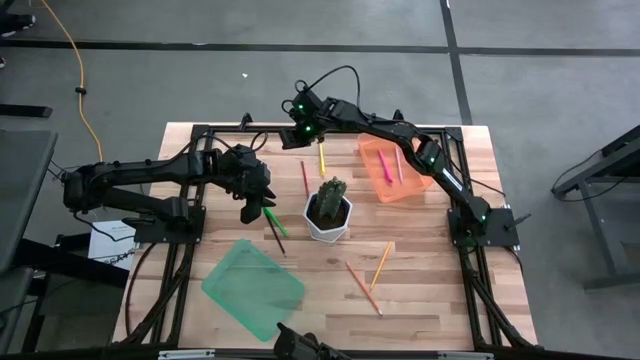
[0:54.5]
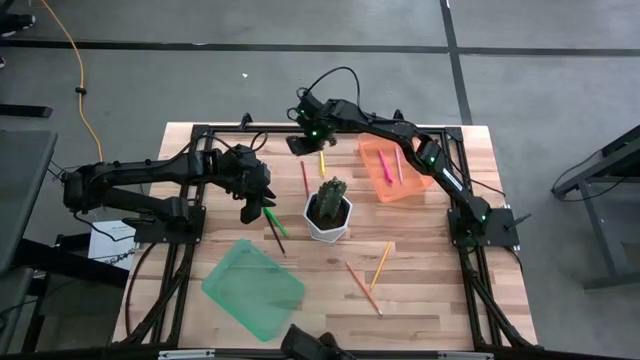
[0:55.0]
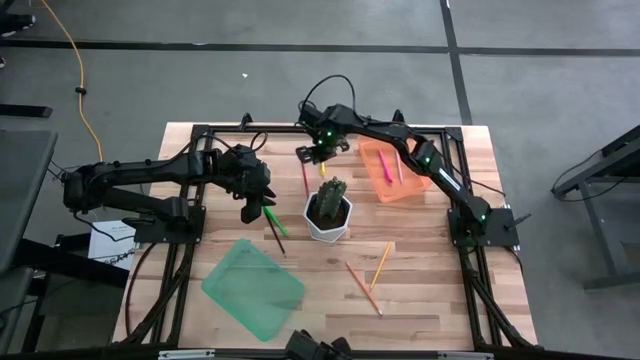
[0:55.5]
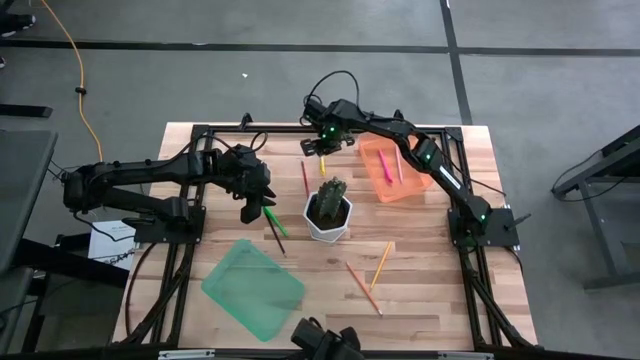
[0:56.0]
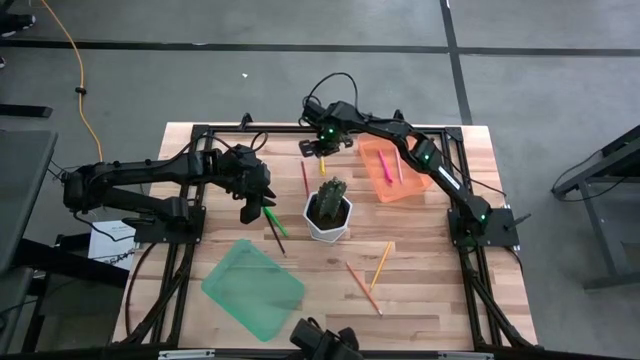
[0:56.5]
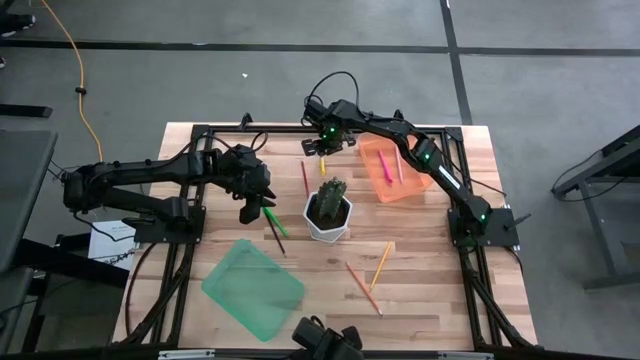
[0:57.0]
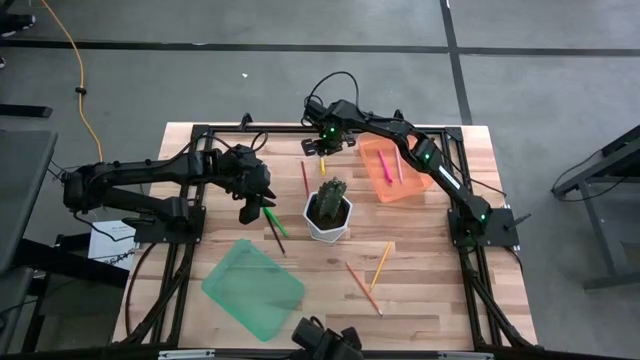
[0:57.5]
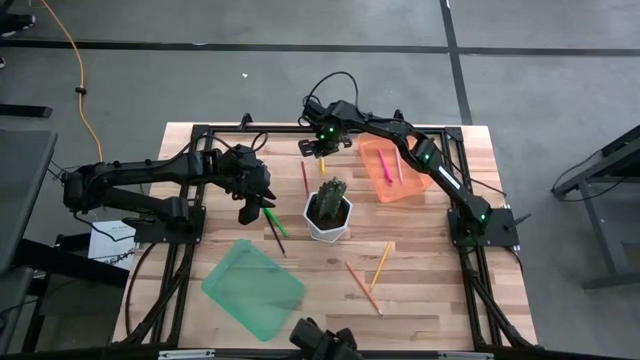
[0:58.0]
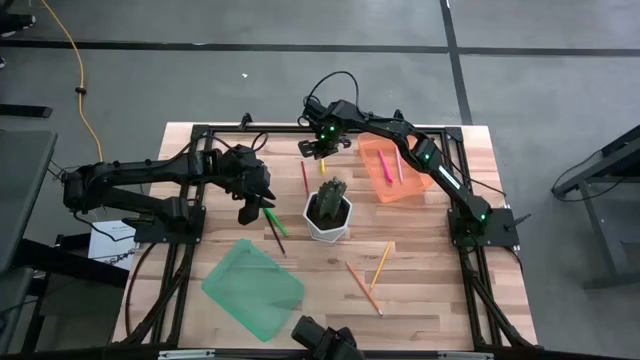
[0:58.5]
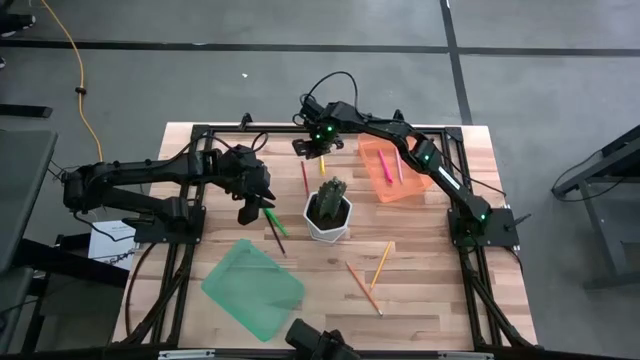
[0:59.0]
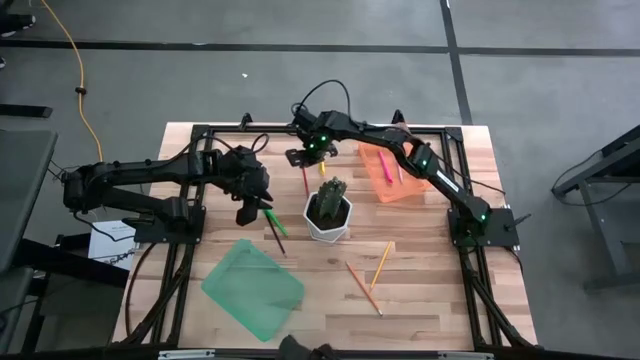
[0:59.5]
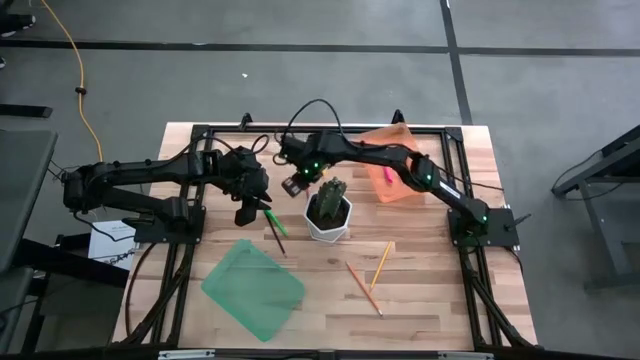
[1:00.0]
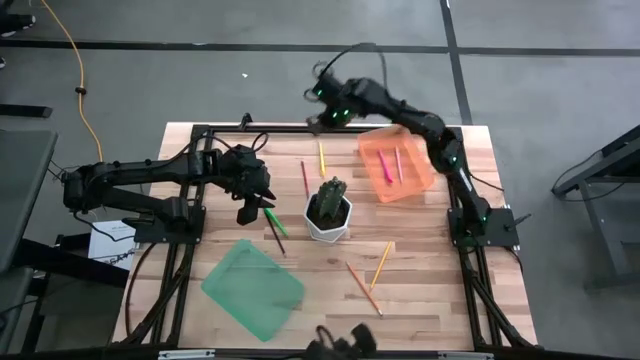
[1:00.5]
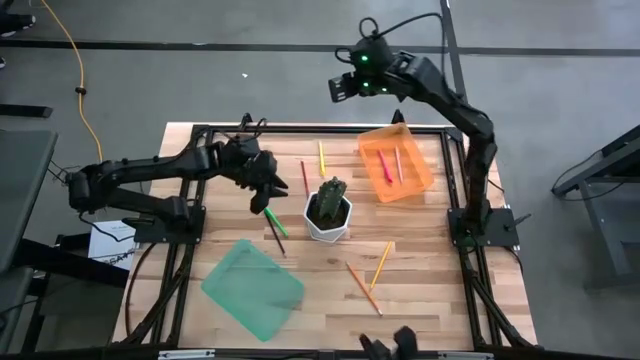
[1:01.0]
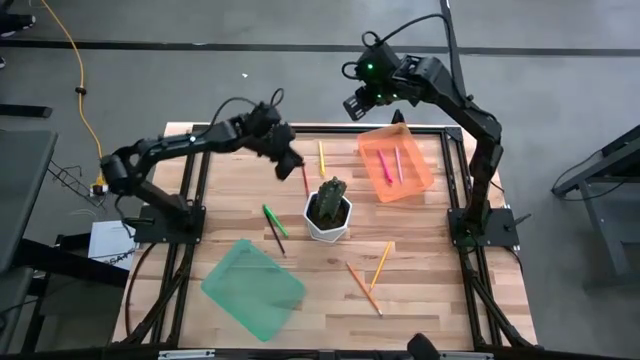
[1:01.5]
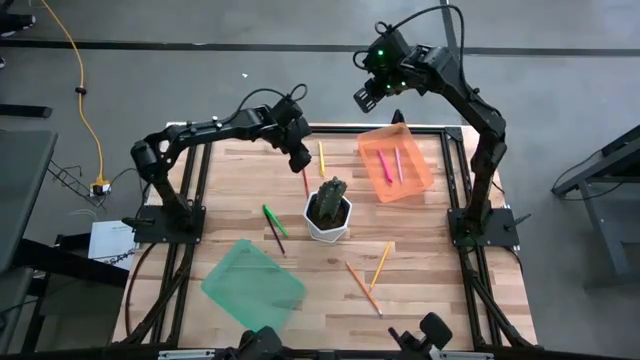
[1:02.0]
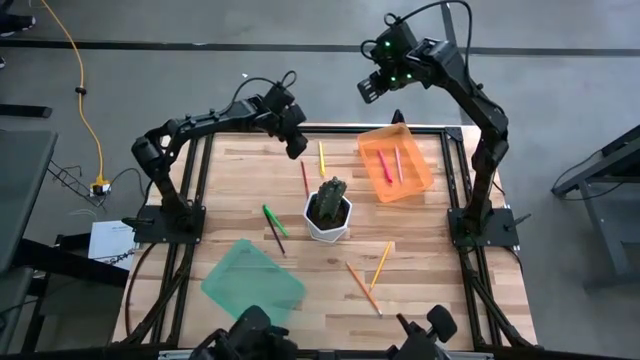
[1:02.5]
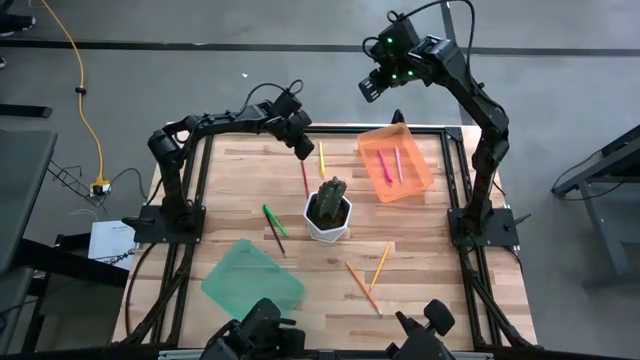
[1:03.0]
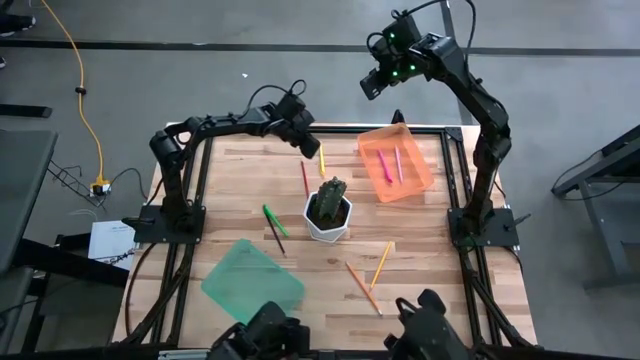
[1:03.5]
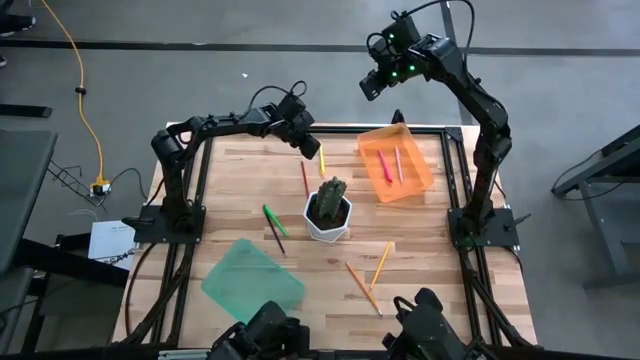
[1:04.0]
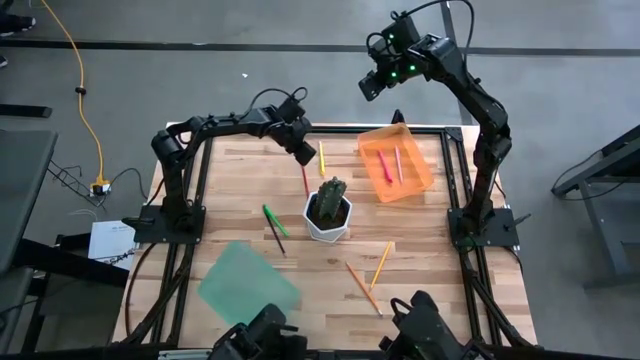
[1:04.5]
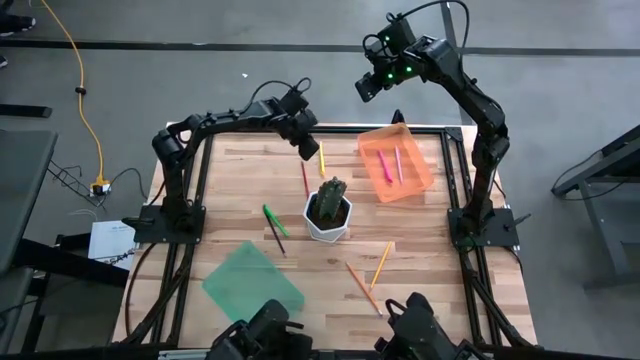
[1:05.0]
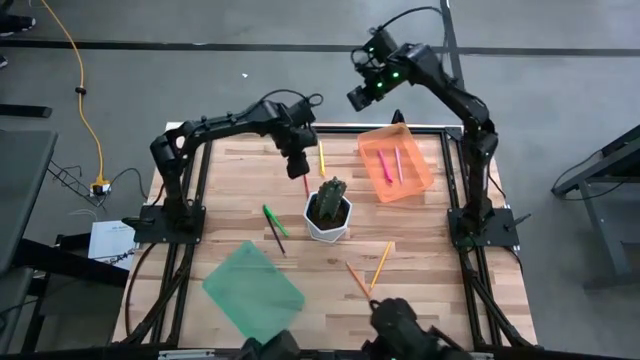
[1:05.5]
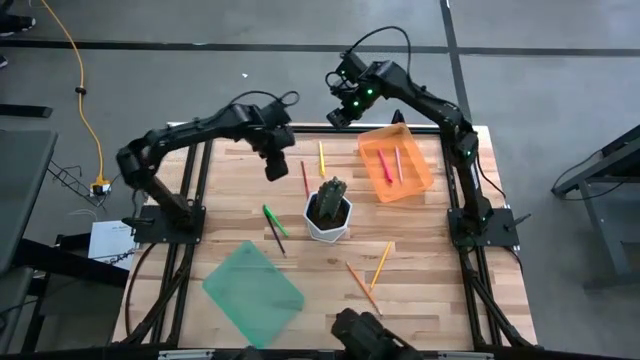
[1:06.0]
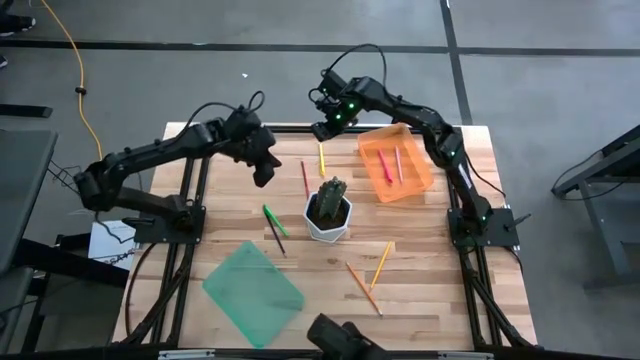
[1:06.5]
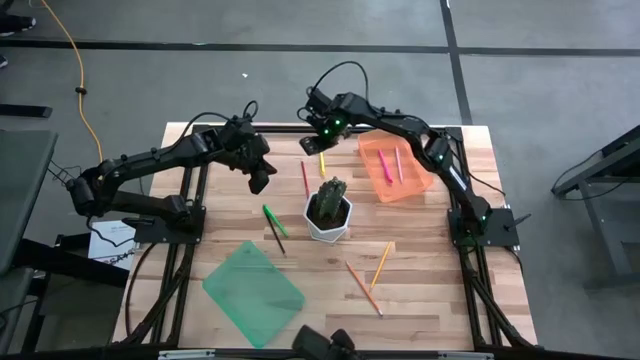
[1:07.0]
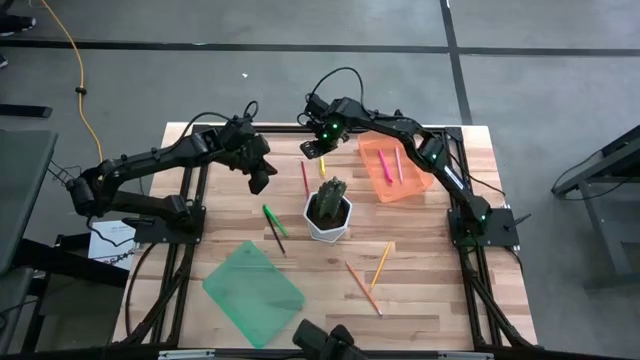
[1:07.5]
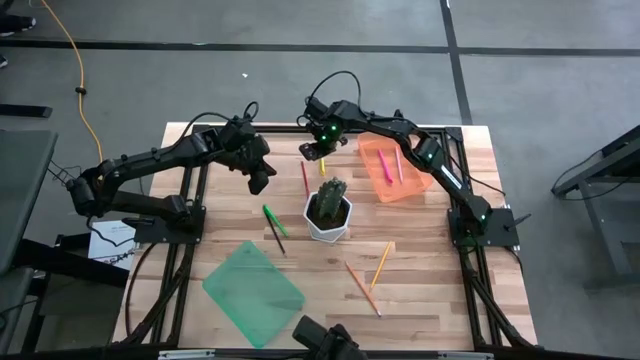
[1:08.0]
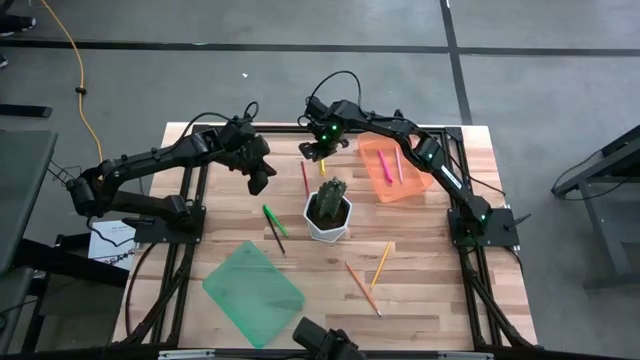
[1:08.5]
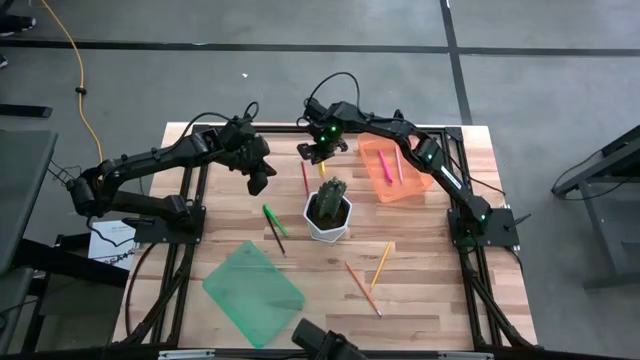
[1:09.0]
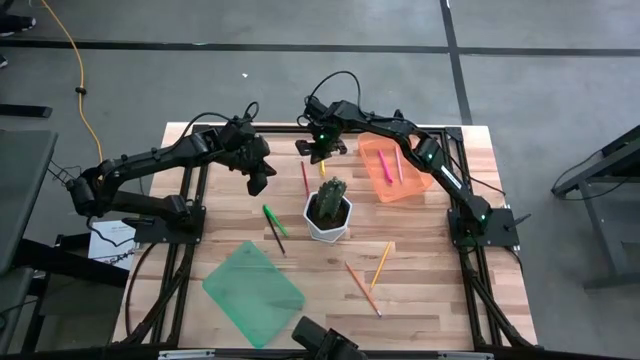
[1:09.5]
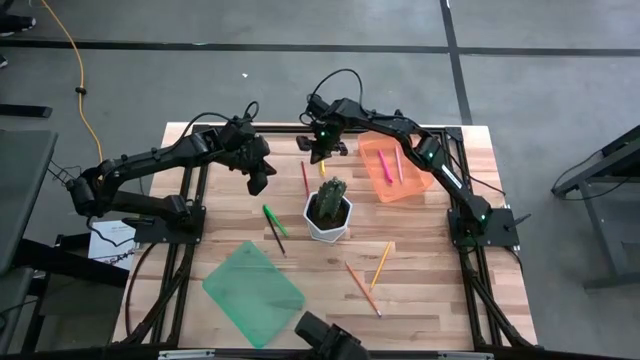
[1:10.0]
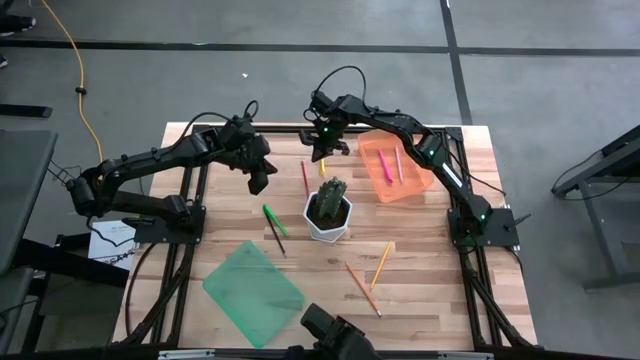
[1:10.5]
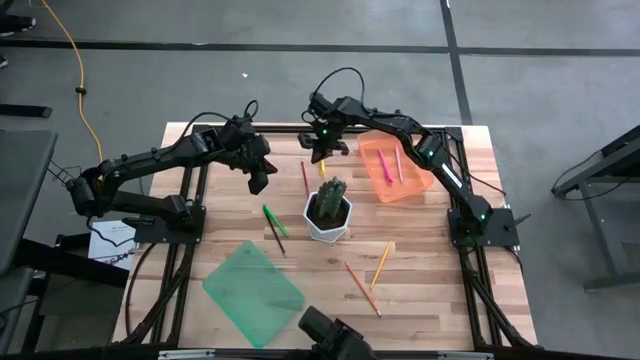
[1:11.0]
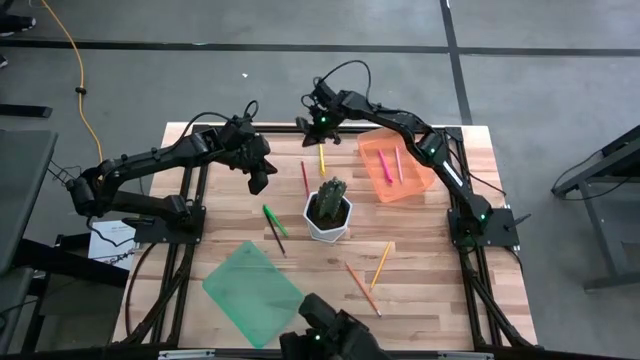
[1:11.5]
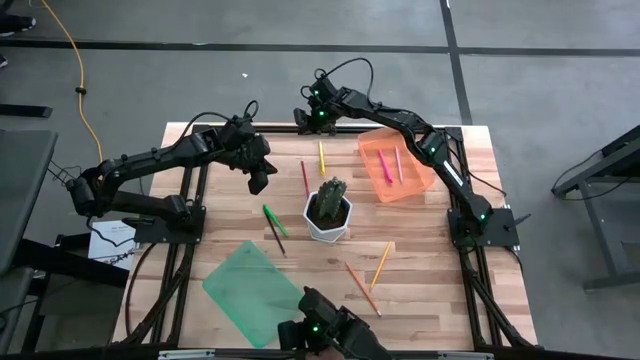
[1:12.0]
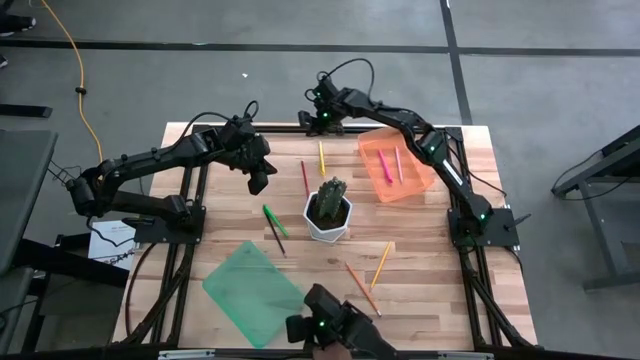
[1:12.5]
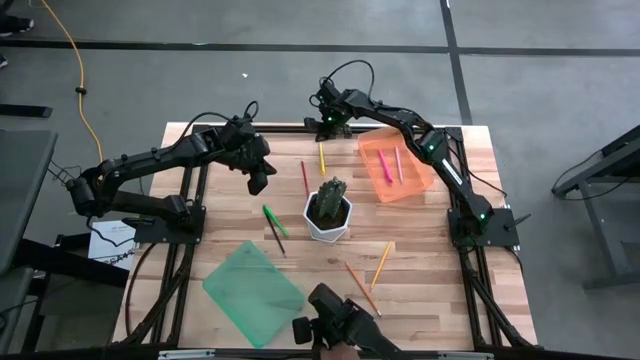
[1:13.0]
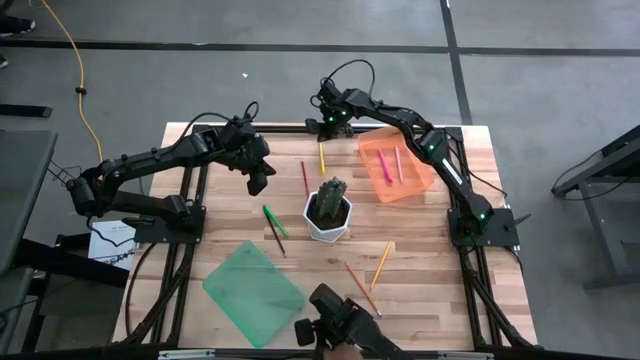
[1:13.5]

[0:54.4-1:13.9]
Task: Sort pens & pencils
Put the yellow pen into the orange bin

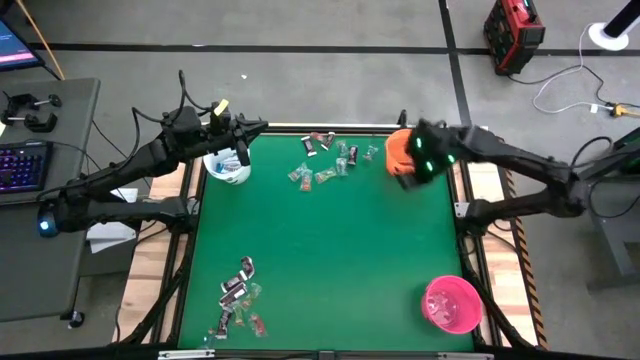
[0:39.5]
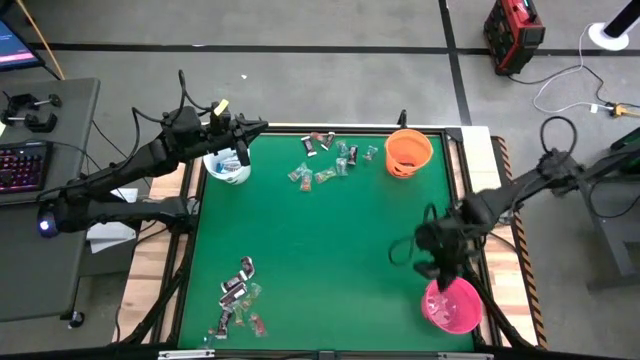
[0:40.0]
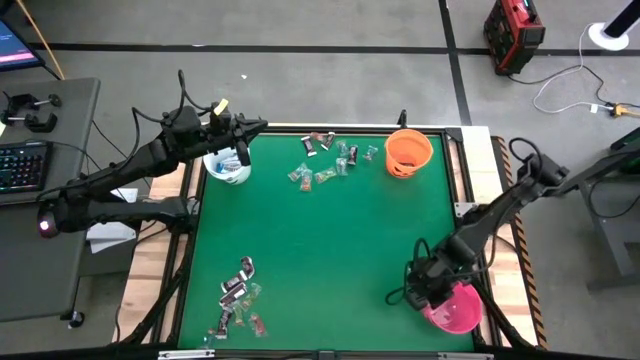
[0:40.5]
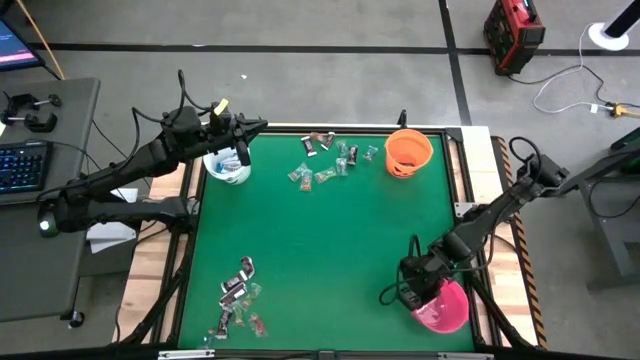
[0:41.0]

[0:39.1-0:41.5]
Task: Sort candy by brand, put in halloween buckets
Adjust the pink bucket
